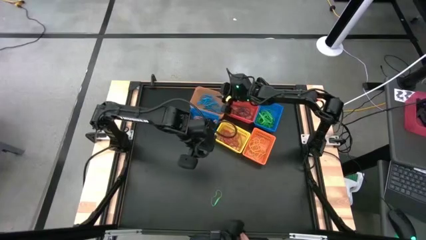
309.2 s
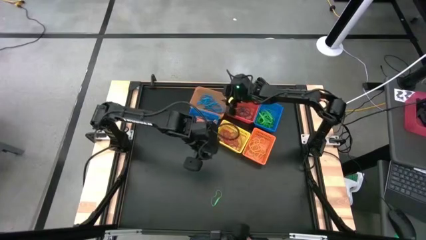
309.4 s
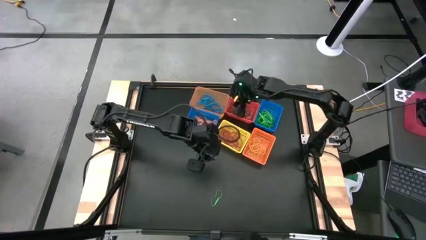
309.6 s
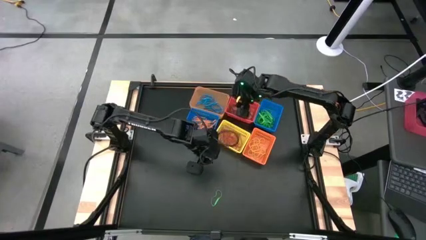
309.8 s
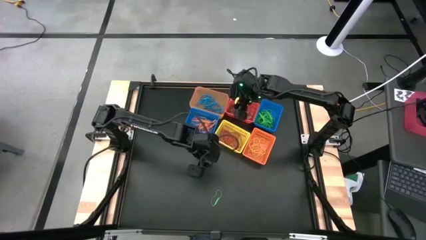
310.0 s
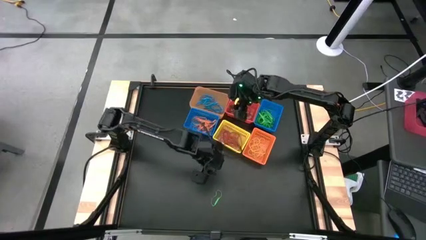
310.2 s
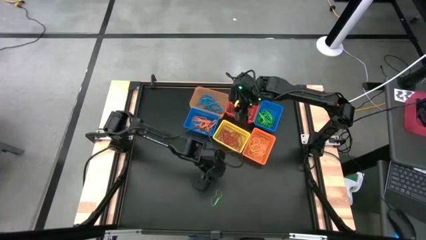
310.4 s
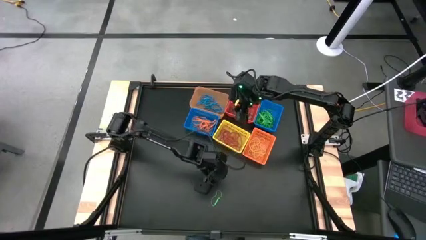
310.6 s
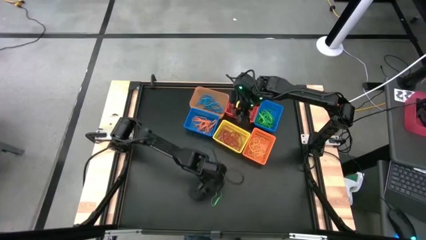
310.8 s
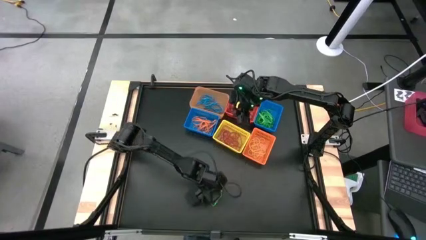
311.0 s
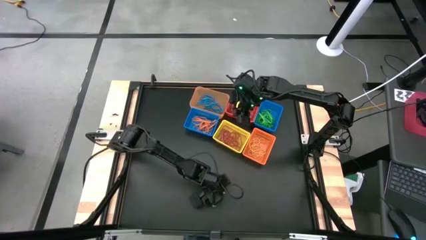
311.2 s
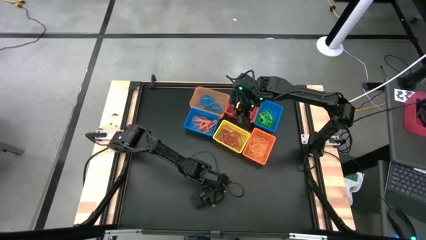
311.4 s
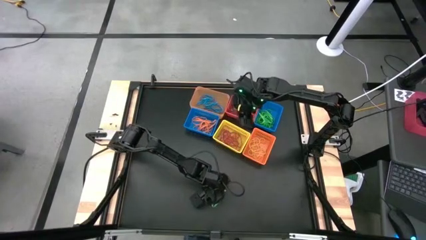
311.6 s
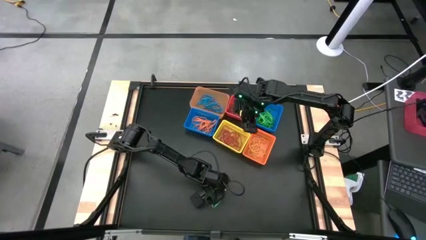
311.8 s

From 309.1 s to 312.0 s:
Task: Sort rubber bands into baskets
Put the green rubber band into the right blue basket

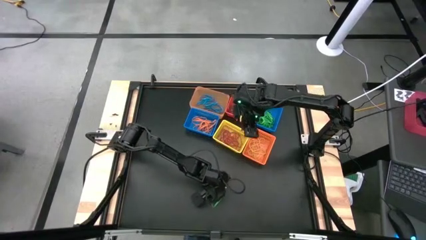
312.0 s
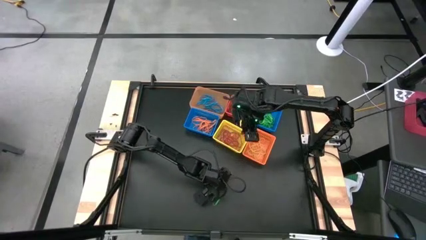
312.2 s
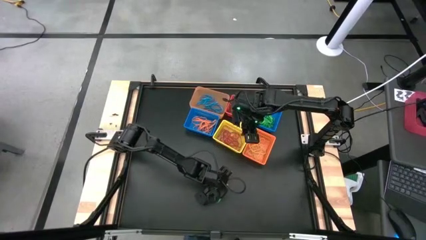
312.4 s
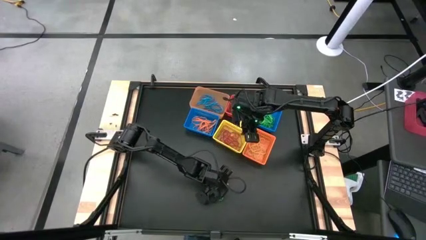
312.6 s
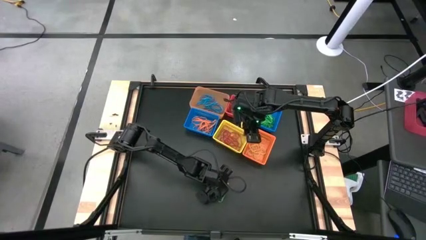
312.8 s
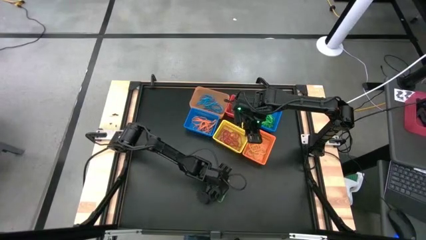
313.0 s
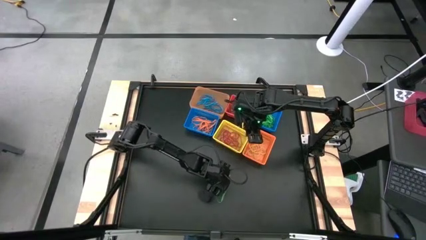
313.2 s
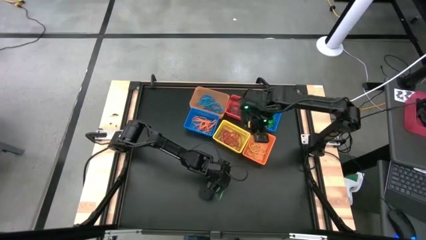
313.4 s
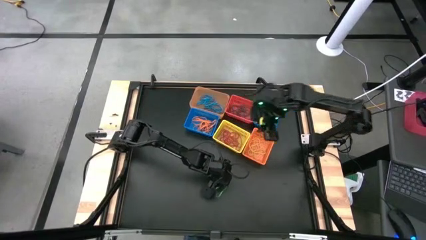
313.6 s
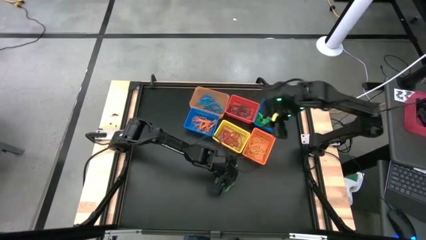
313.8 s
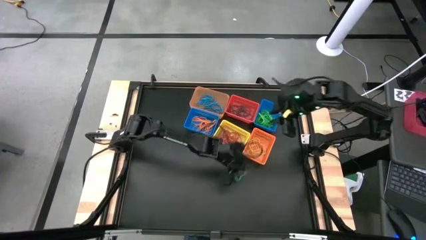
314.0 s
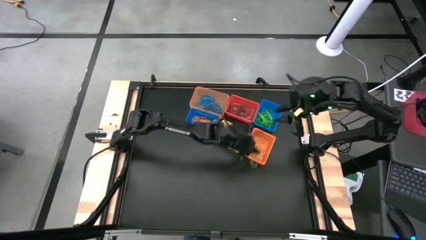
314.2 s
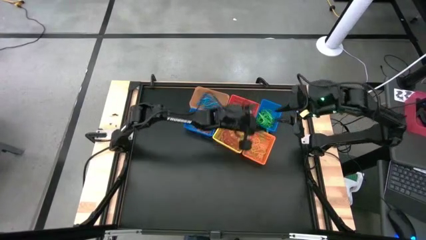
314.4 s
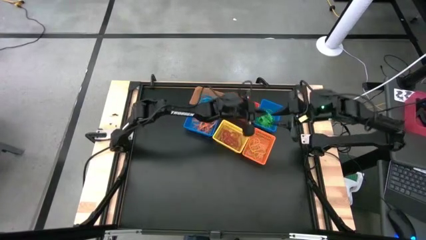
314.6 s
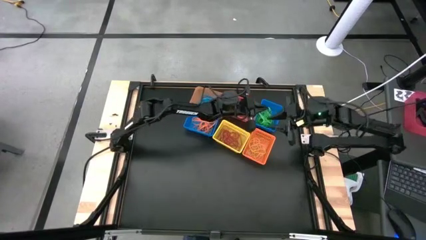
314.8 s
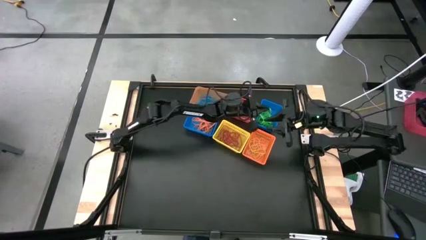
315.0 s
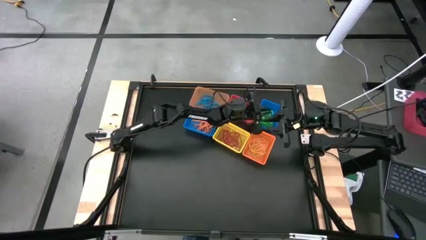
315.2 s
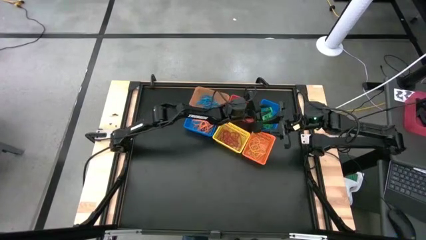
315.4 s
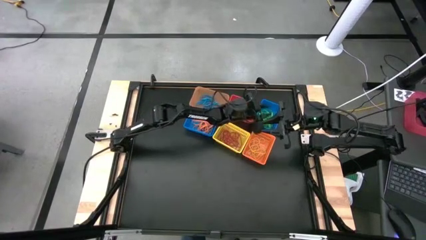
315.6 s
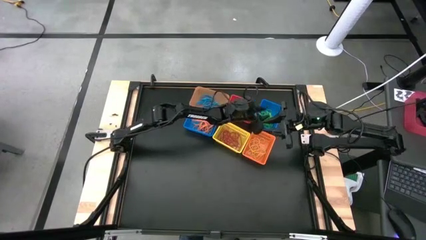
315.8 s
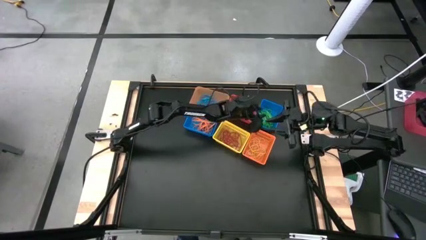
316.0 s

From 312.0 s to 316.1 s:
Put the green rubber band into the right blue basket

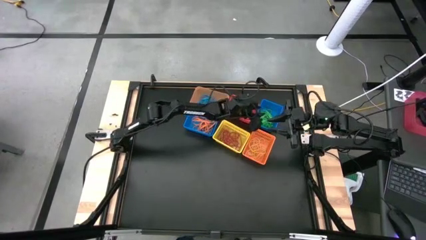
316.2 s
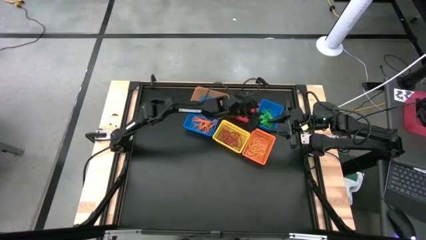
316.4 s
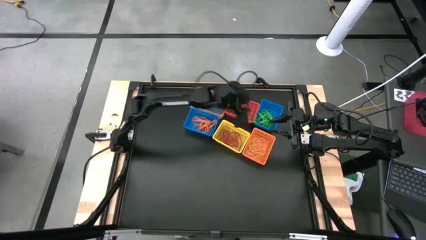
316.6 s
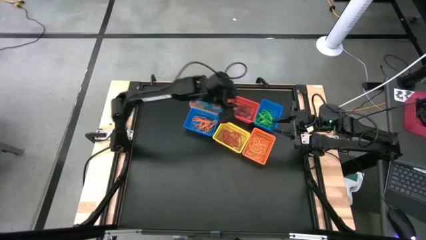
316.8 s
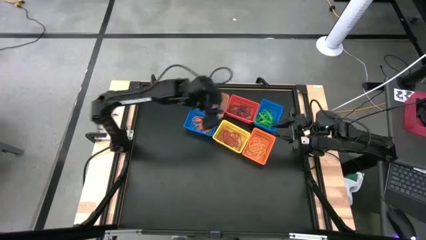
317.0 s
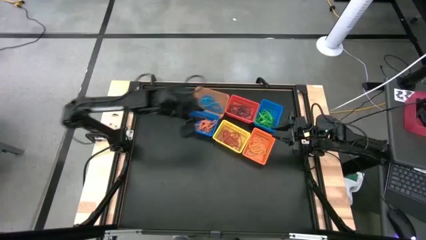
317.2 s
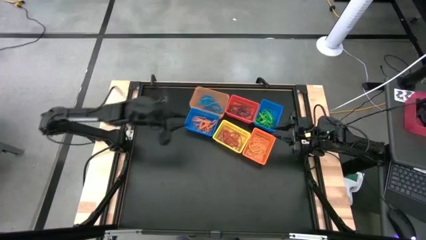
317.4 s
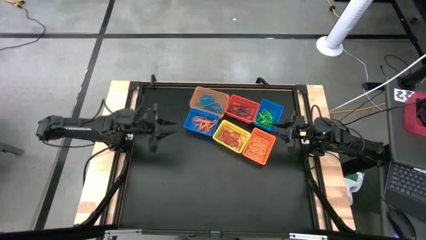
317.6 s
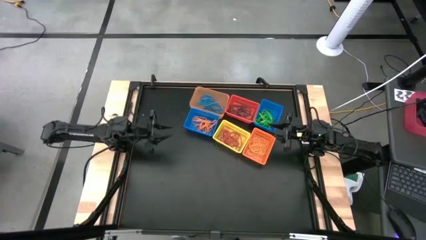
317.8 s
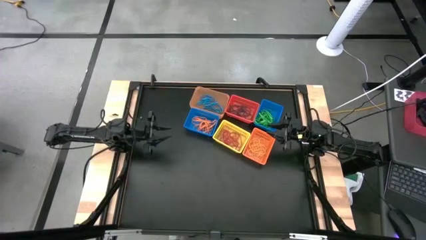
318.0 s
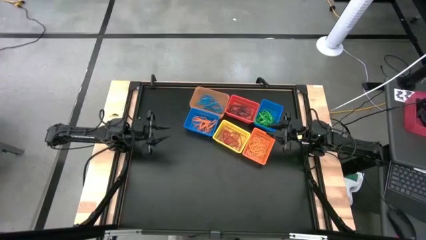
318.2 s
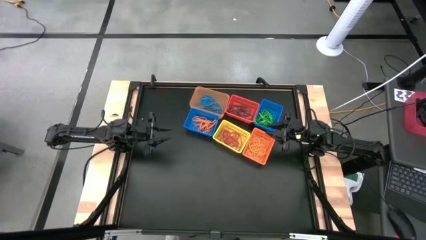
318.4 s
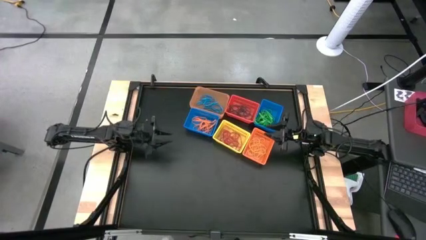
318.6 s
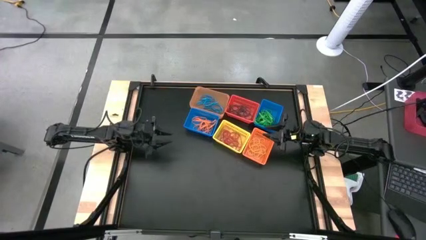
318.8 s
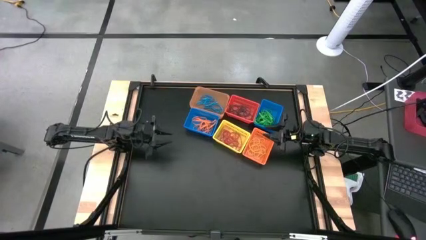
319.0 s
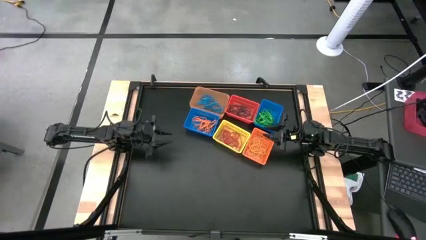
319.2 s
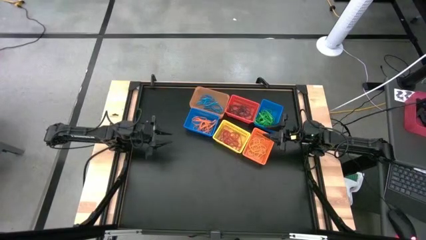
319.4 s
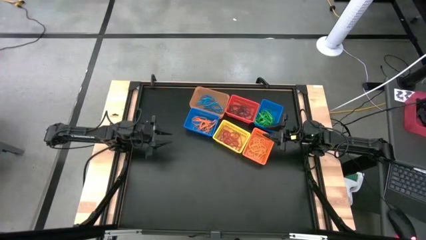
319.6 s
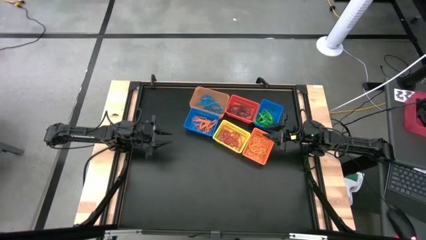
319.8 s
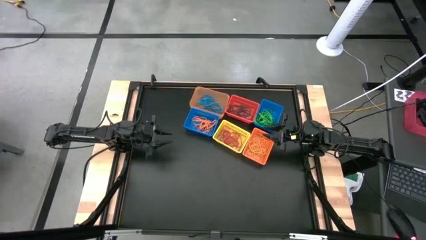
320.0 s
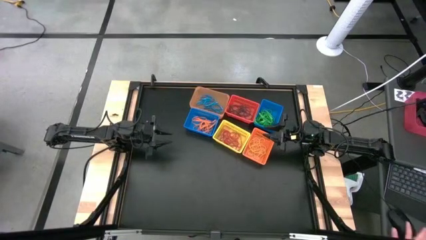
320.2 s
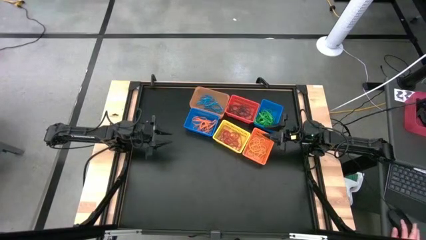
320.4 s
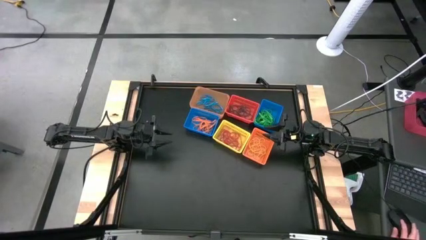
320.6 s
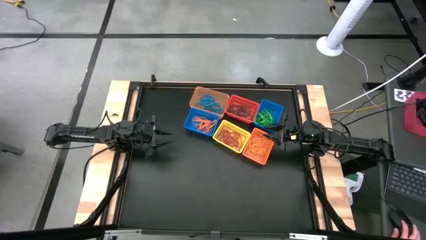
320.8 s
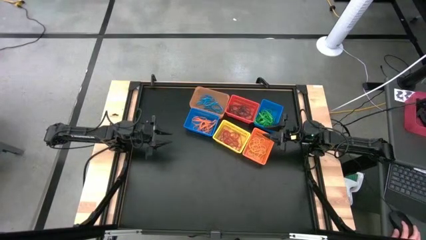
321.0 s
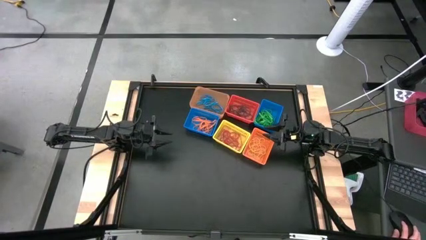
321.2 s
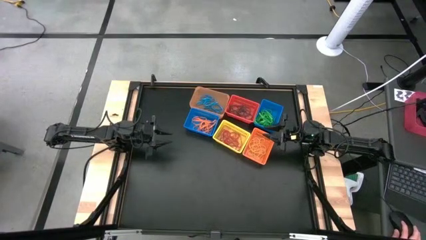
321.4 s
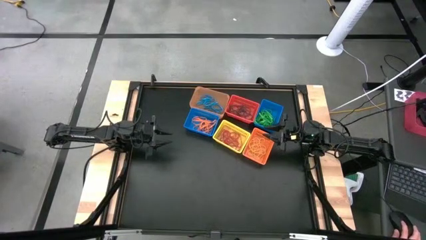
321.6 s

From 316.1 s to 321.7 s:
Return to Home Position

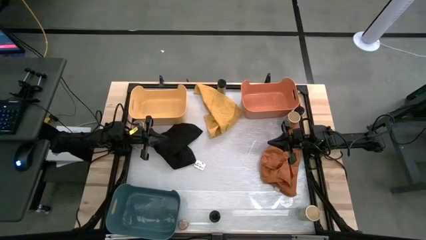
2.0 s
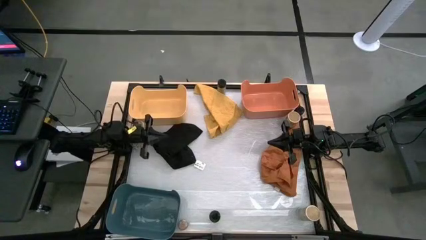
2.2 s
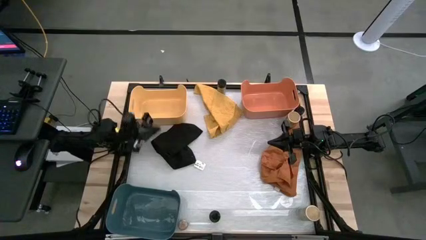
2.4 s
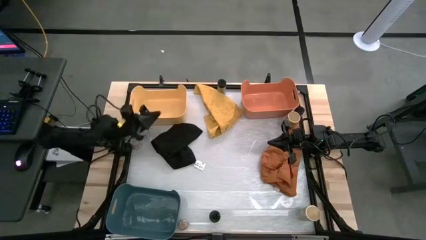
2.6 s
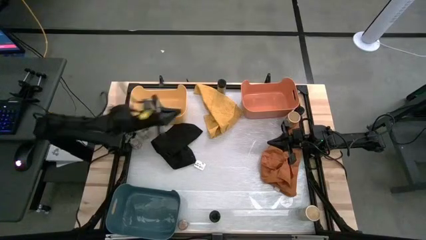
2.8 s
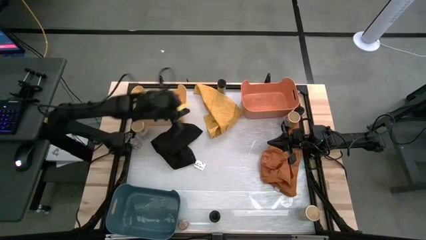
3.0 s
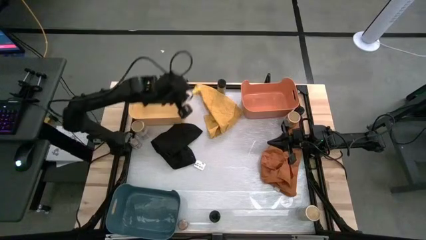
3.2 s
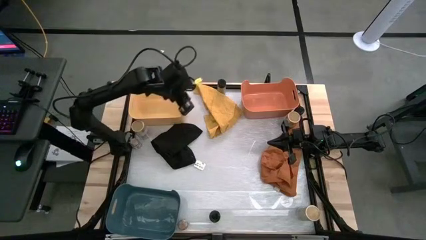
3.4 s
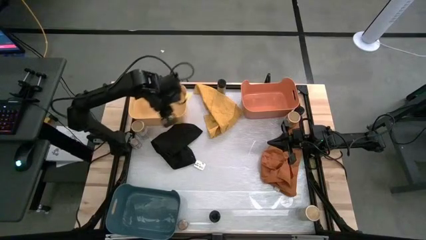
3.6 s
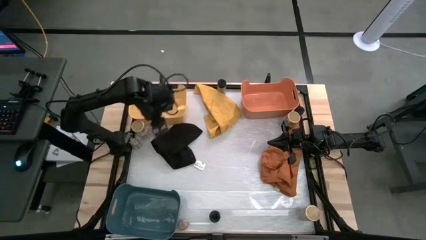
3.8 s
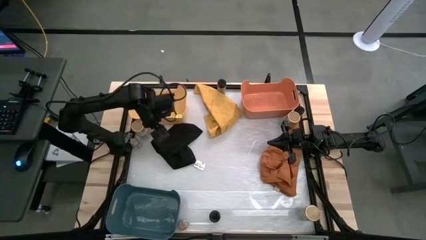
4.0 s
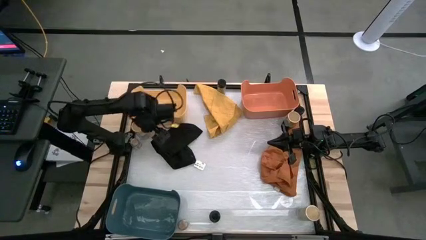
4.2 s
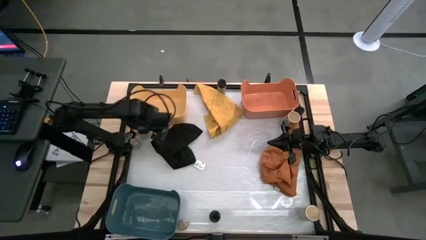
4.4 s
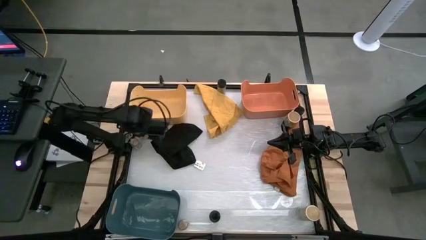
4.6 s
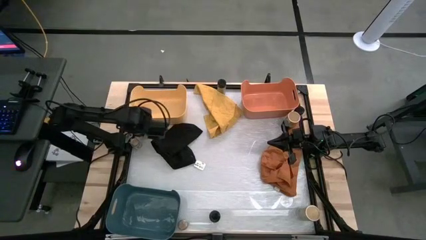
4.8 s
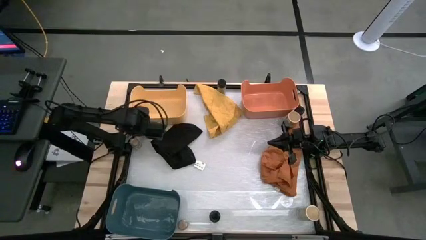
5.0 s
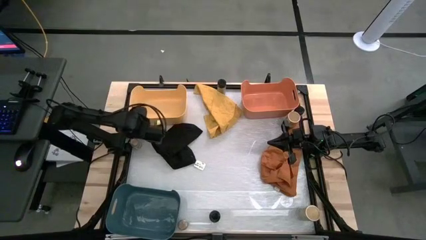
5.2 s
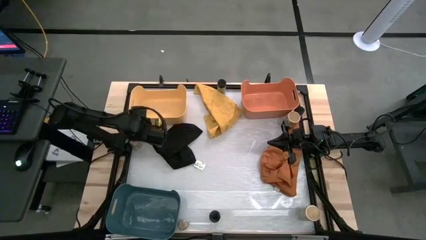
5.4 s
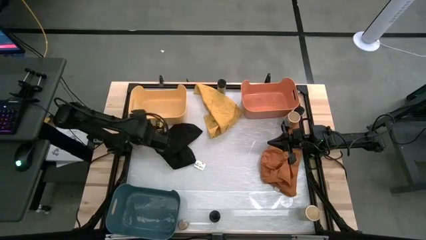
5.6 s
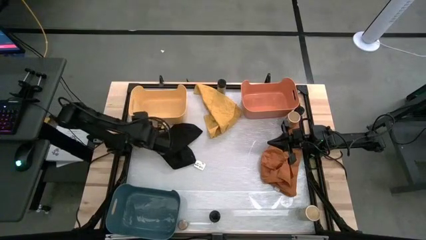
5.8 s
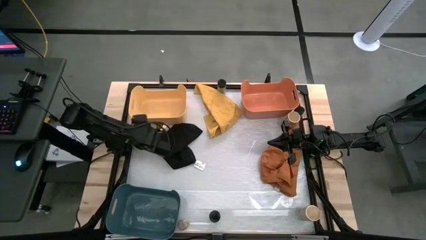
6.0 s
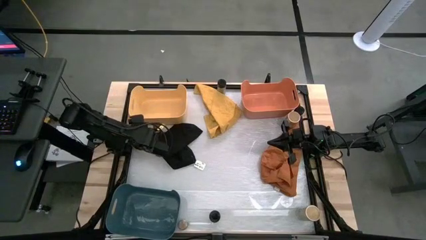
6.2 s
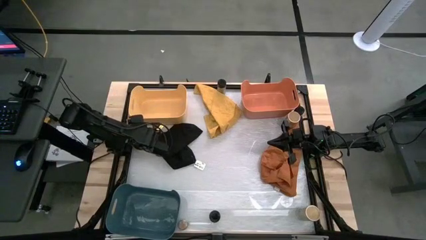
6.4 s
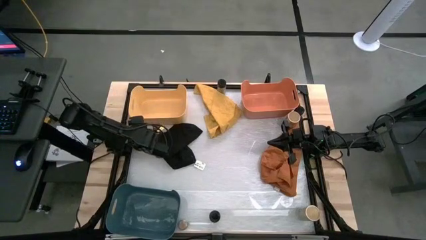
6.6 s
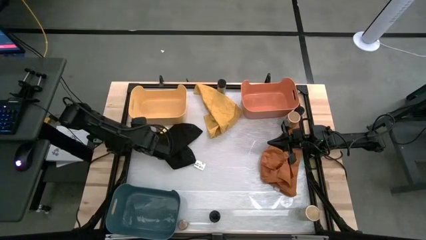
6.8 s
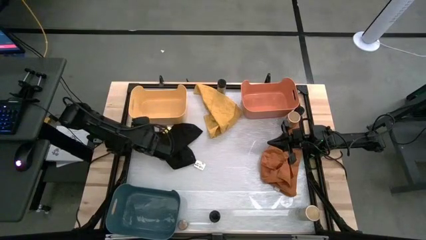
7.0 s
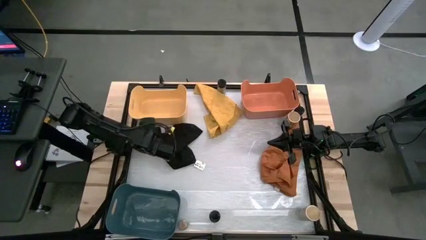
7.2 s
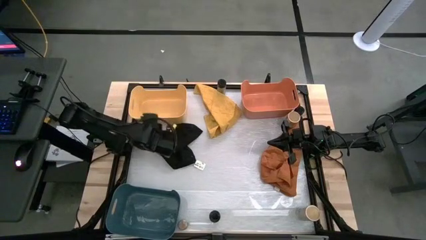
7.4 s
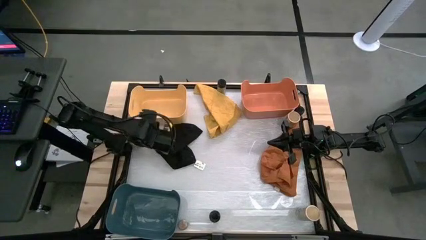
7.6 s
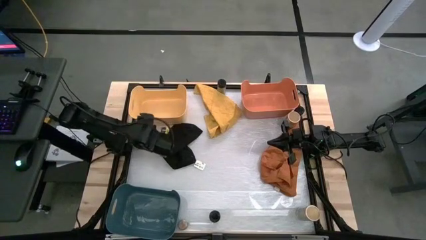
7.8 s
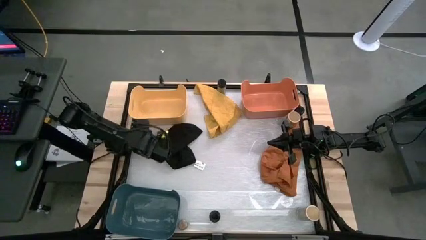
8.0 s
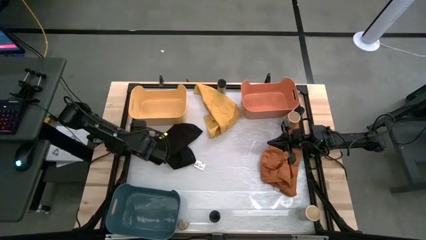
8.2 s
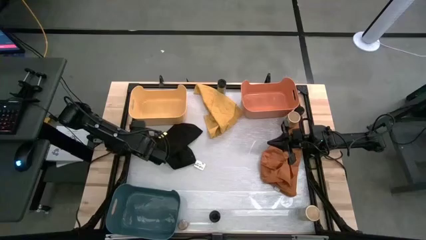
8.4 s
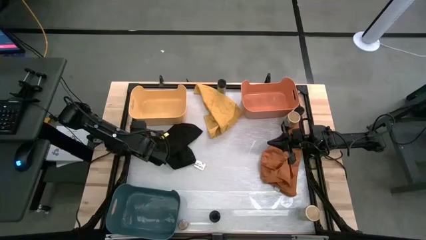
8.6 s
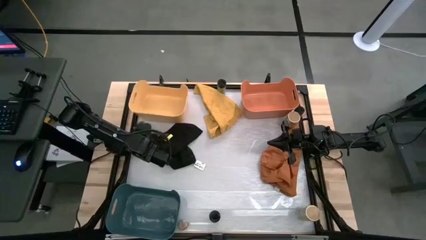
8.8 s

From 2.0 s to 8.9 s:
Task: Sort spices by type
Put the left gold seasoning bottle into the yellow bin
